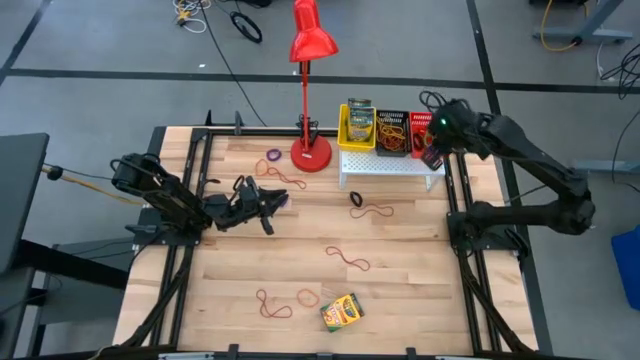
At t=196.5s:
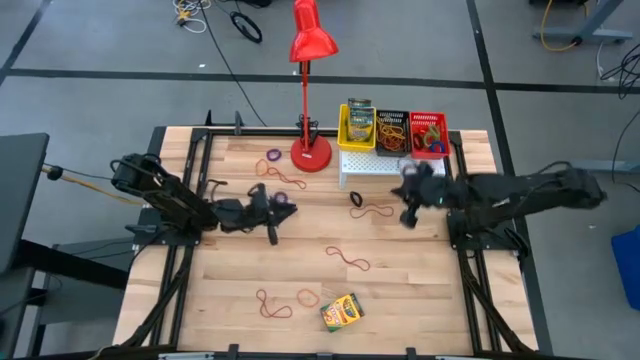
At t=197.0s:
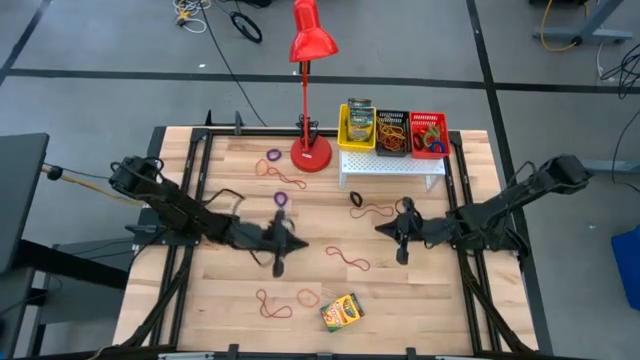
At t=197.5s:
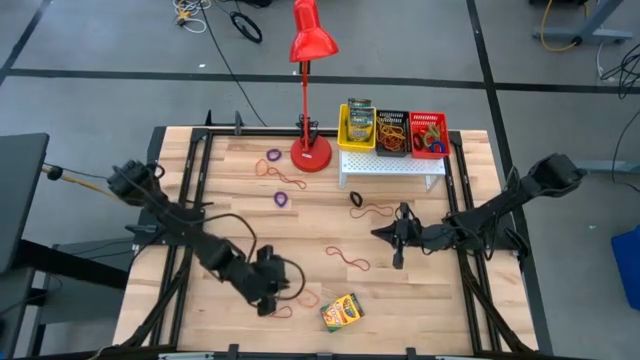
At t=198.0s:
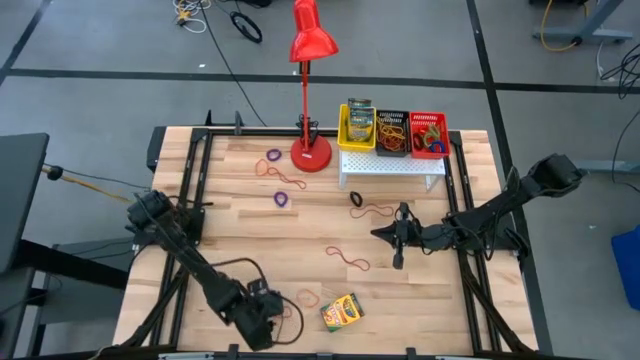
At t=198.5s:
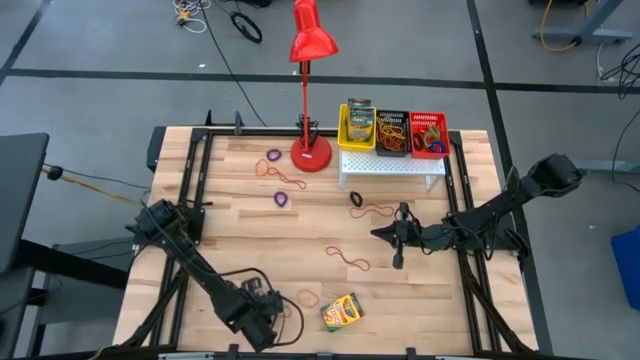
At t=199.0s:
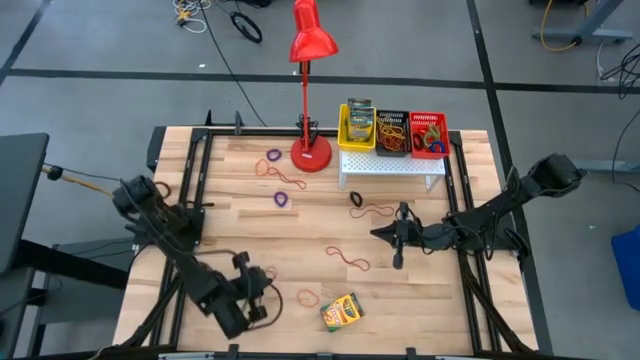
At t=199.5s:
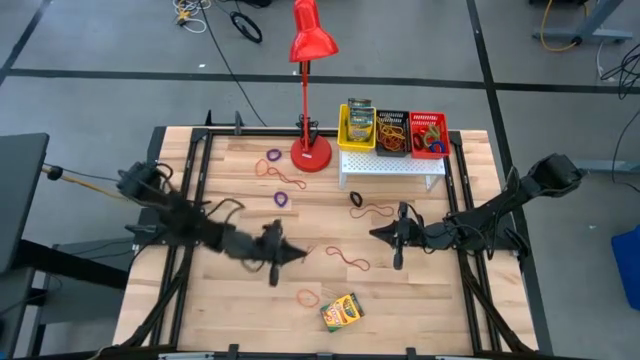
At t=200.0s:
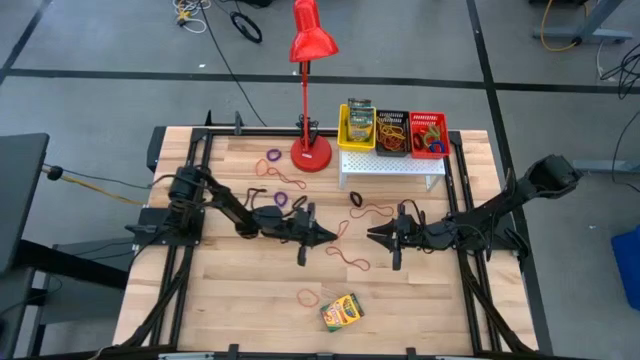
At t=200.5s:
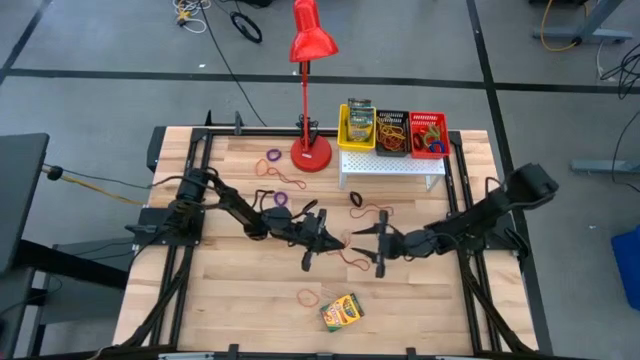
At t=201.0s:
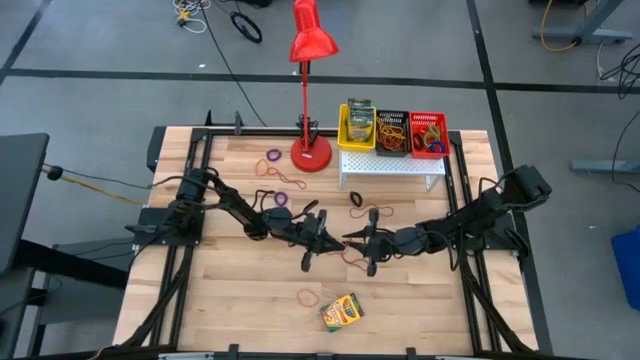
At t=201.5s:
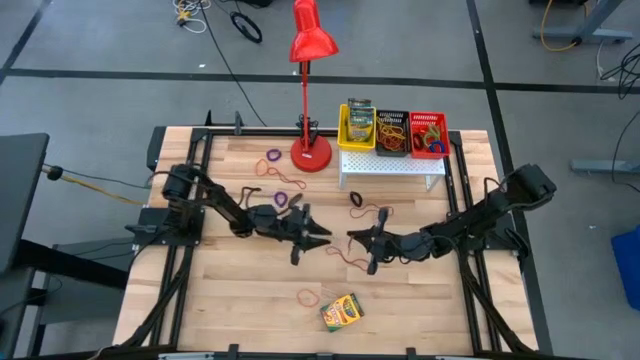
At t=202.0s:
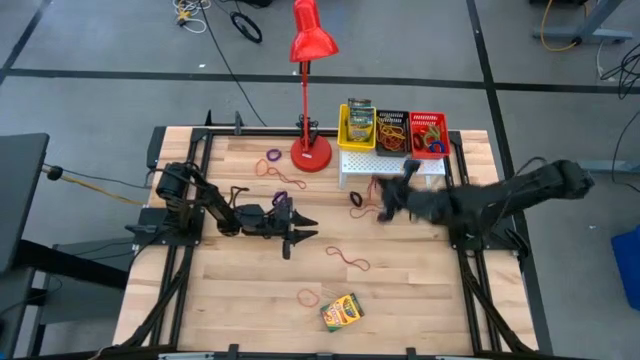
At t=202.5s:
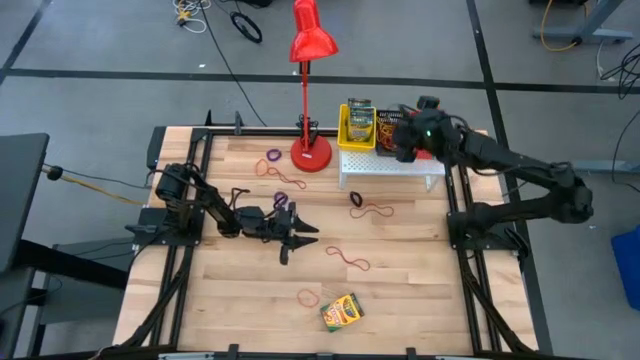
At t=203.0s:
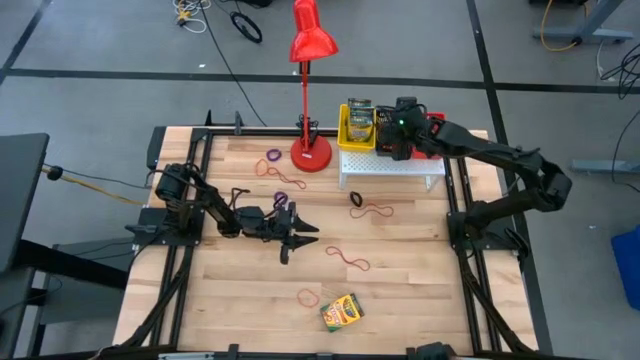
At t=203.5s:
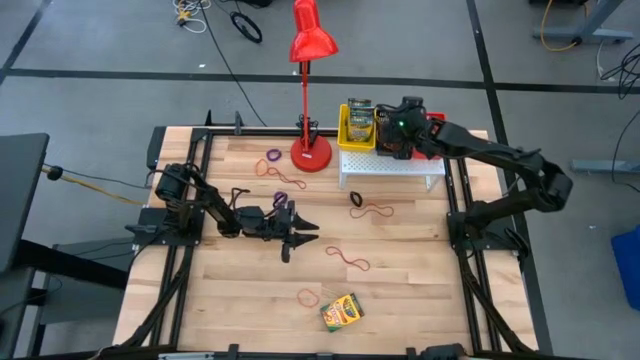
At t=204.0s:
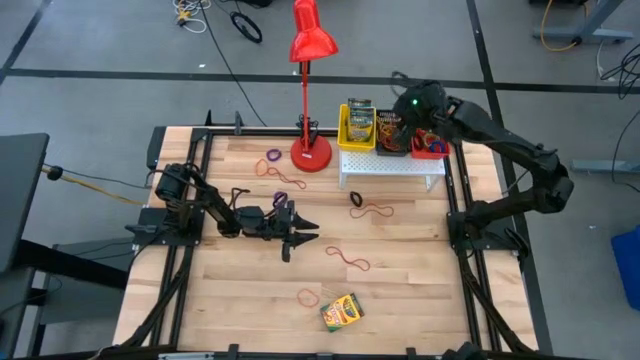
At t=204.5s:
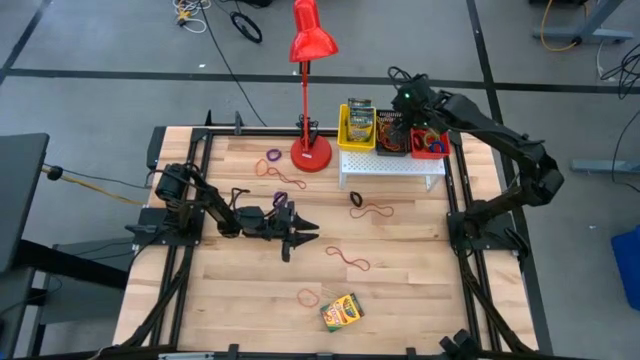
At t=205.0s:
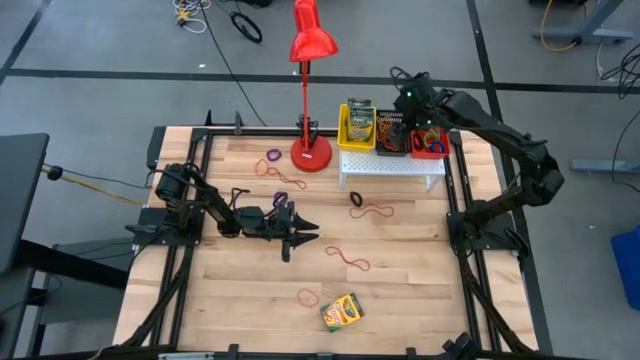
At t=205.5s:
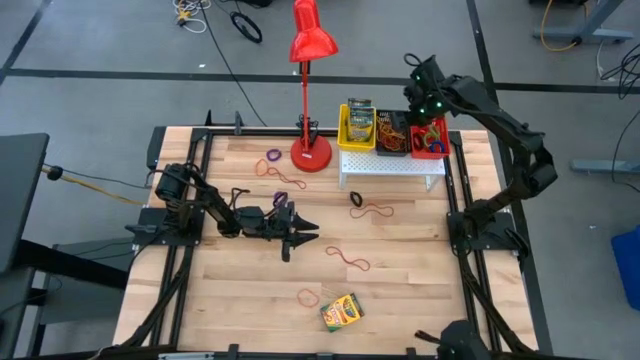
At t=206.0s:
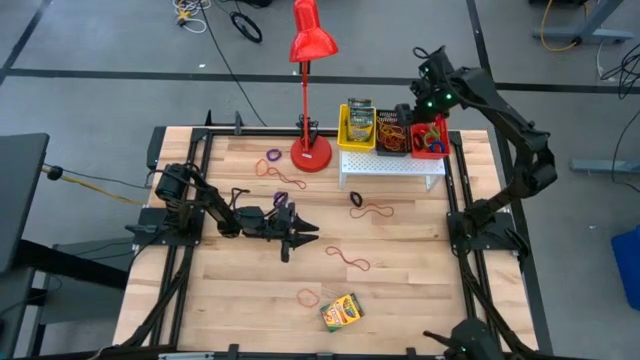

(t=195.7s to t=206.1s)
Task: Pick & Place Office Desk Supplies
Put the red rubber band into the black bin on the shelf

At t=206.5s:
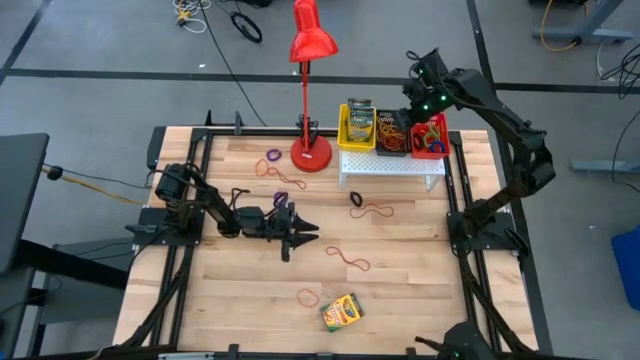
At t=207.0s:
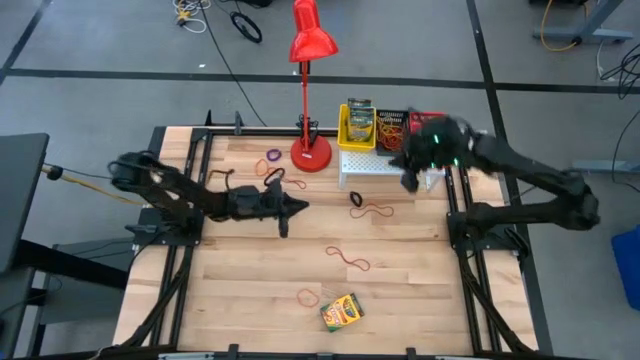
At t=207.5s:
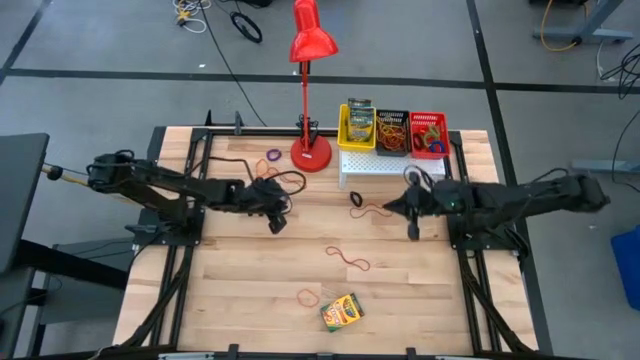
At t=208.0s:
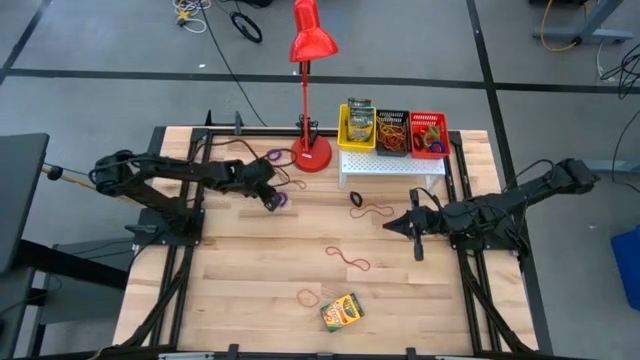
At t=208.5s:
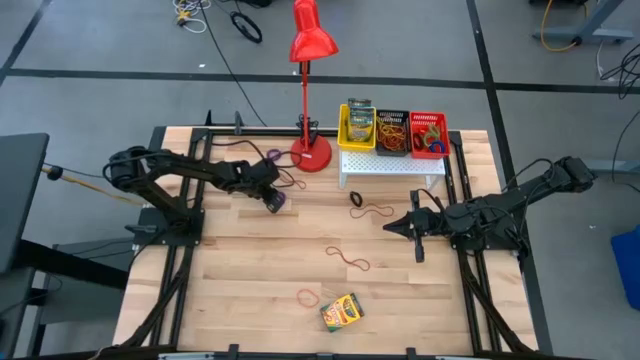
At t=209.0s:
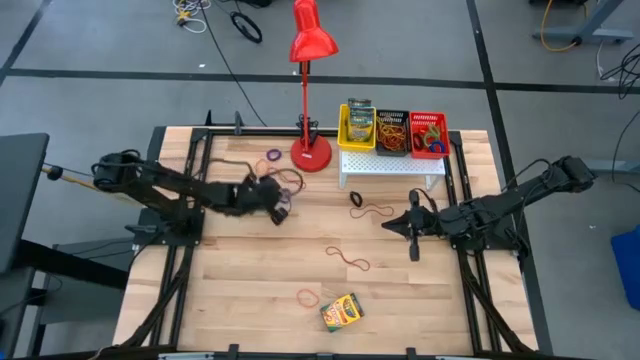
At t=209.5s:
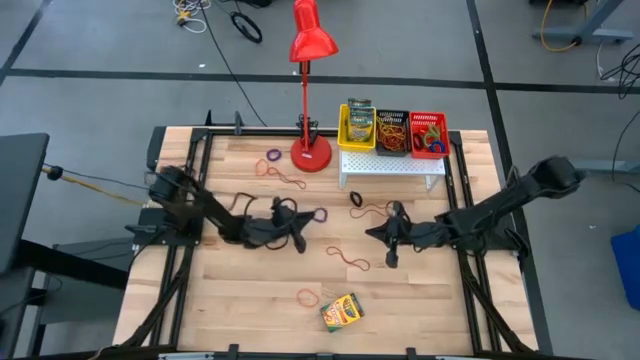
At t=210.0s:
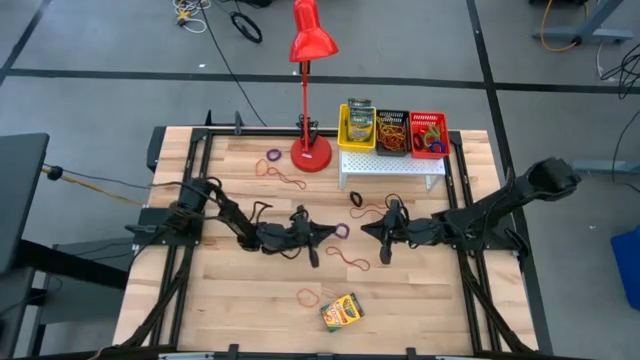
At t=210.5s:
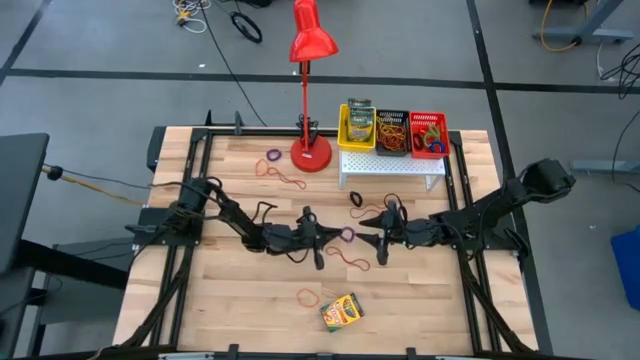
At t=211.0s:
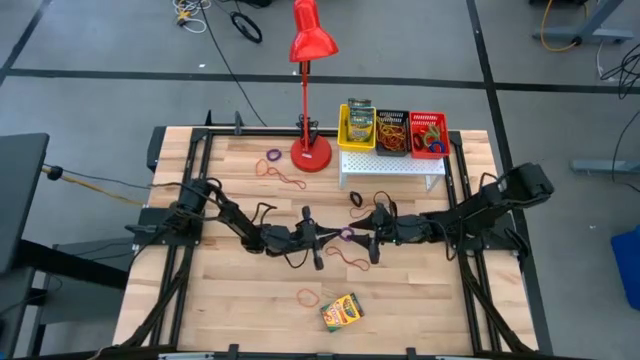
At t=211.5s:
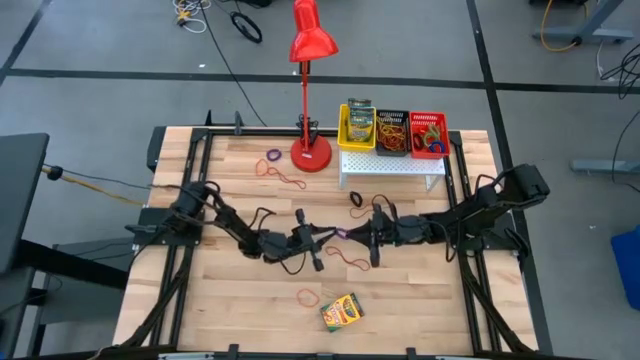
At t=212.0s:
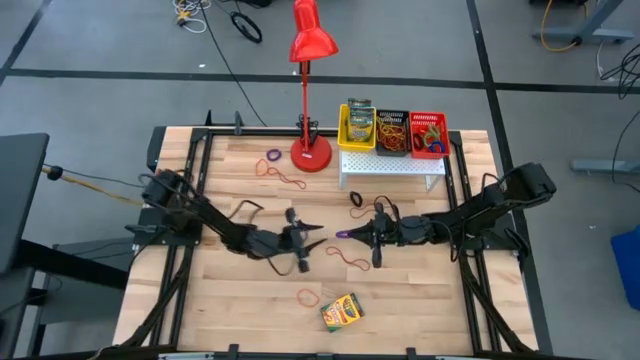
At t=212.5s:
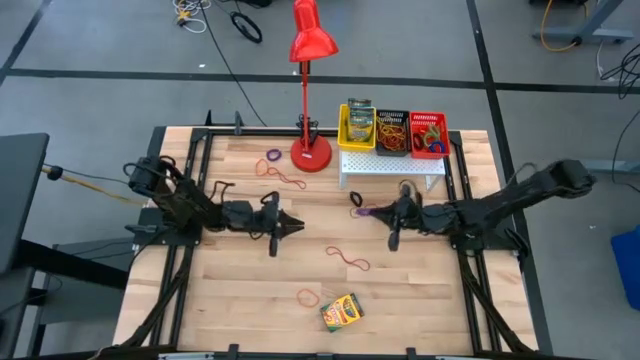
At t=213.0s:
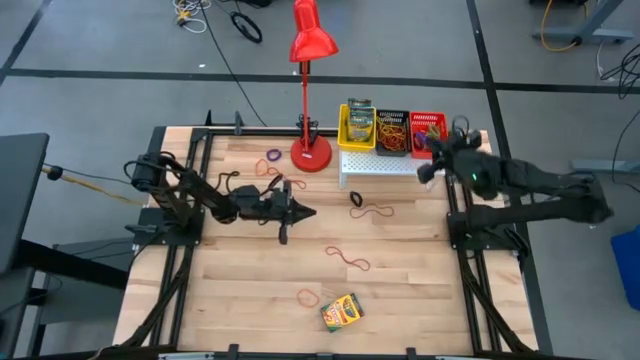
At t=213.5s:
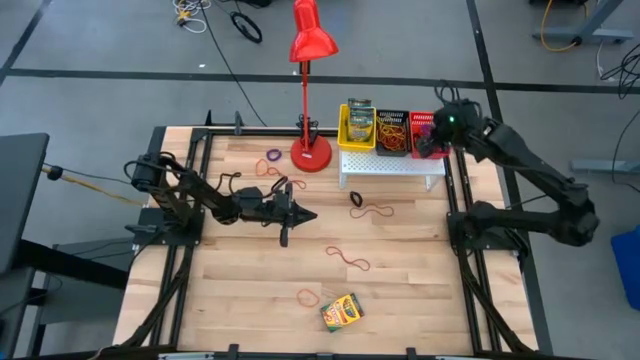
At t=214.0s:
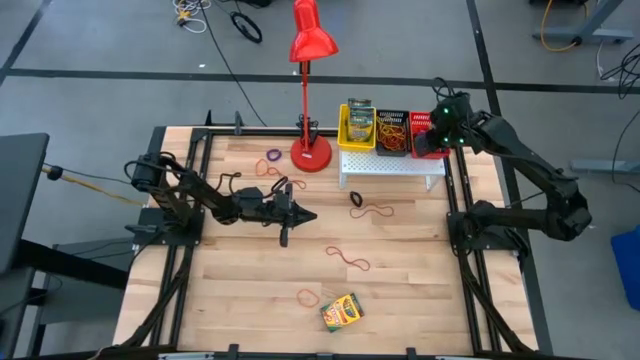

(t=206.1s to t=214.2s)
Put the purple spring keychain into the red bin on the shelf

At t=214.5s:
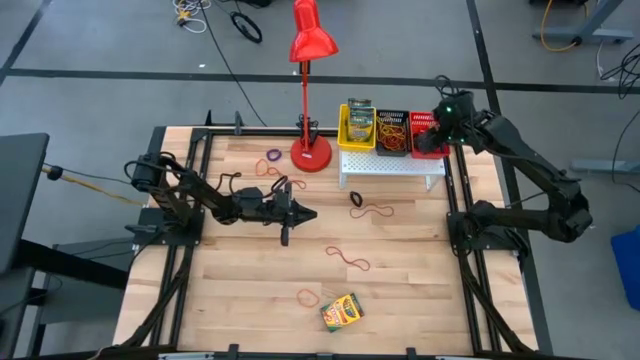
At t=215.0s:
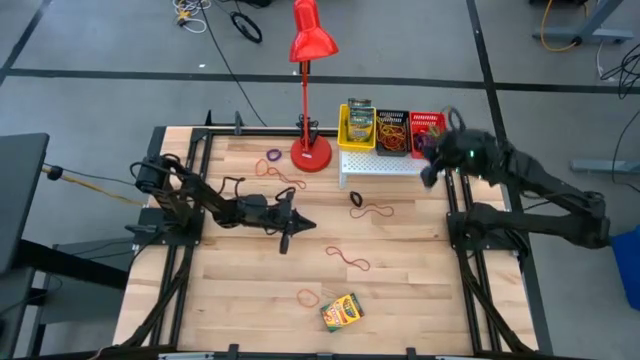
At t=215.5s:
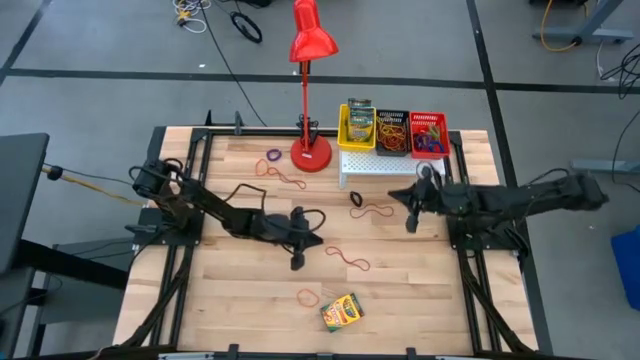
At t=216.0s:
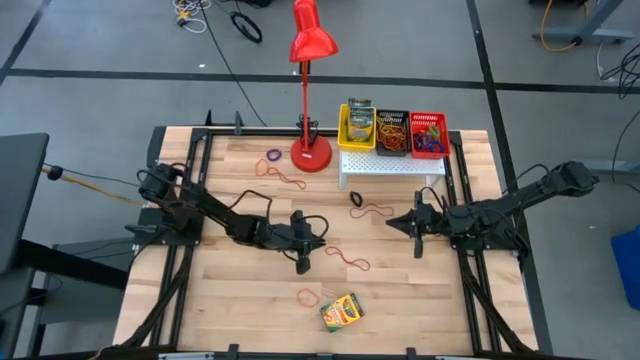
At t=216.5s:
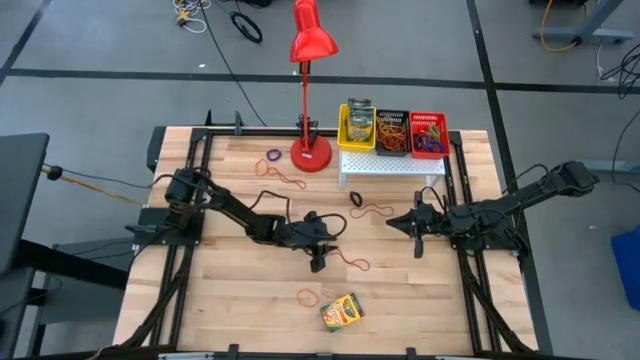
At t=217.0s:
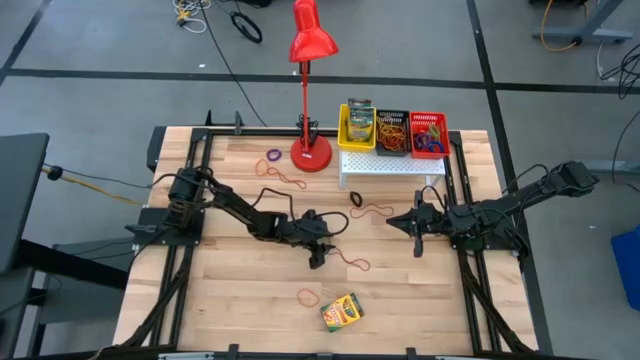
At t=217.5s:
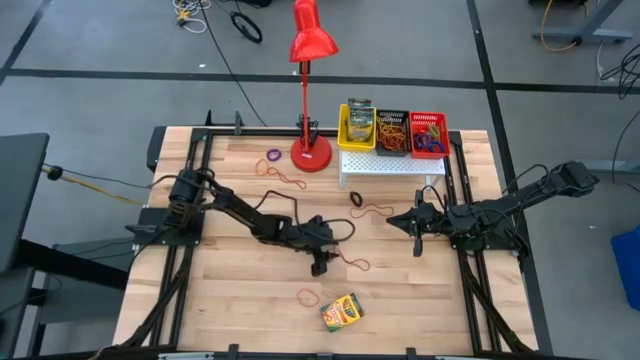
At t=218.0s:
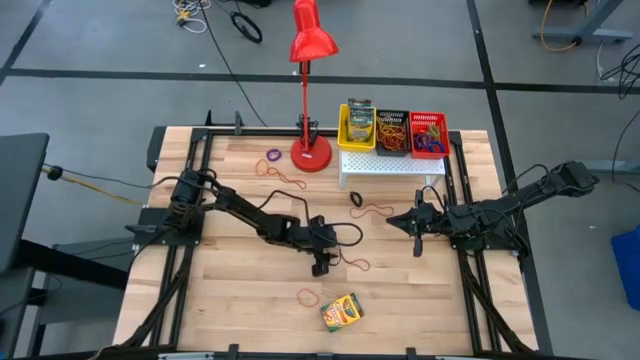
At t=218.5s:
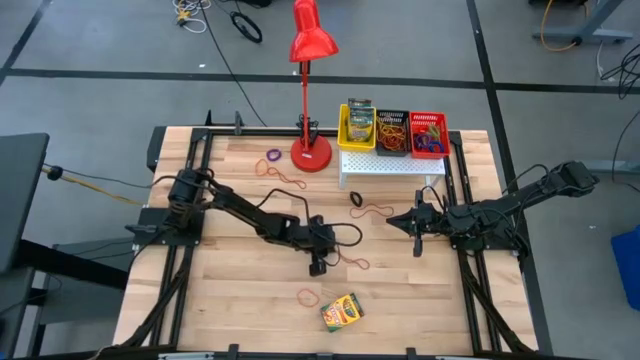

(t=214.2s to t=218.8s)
Put the red rubber band into the black bin on the shelf
